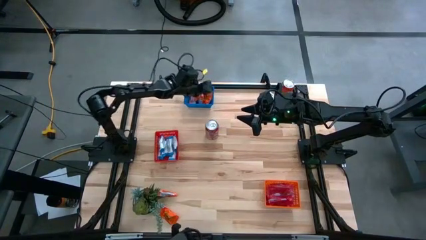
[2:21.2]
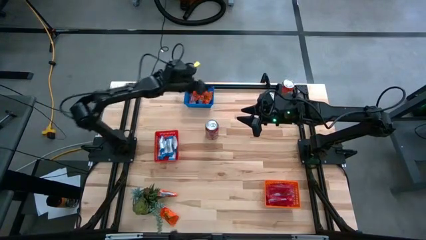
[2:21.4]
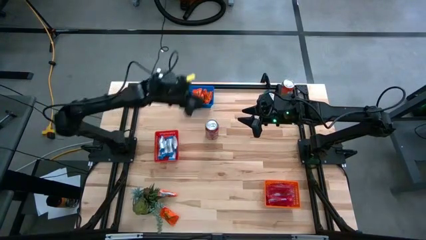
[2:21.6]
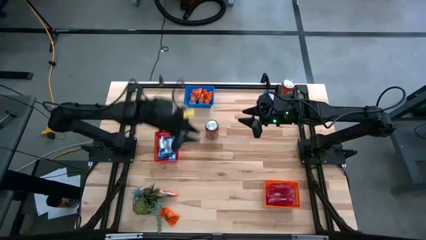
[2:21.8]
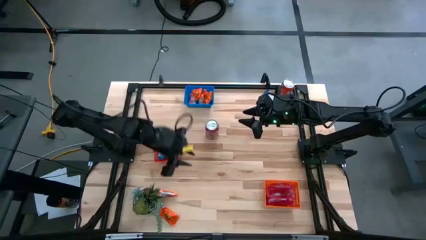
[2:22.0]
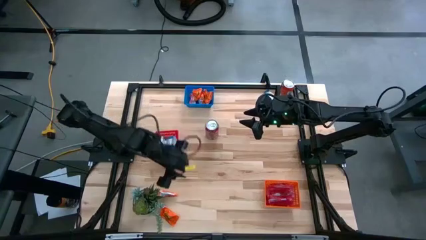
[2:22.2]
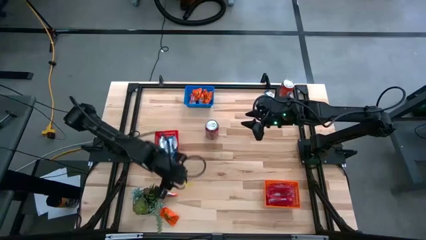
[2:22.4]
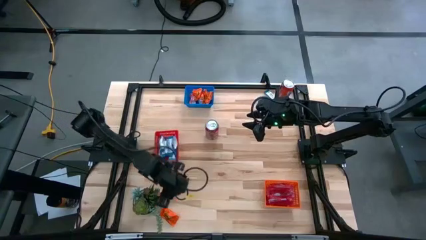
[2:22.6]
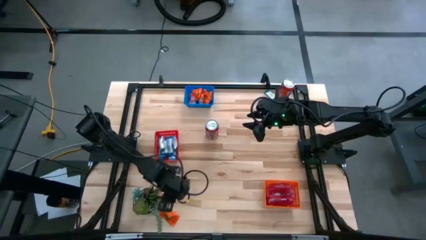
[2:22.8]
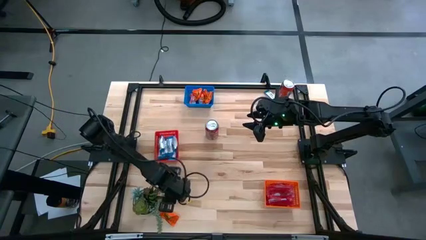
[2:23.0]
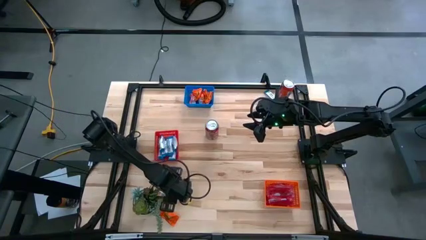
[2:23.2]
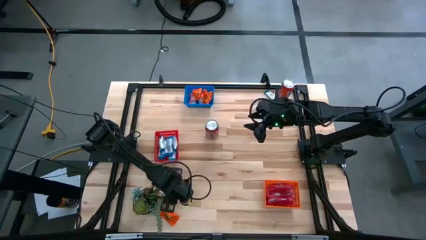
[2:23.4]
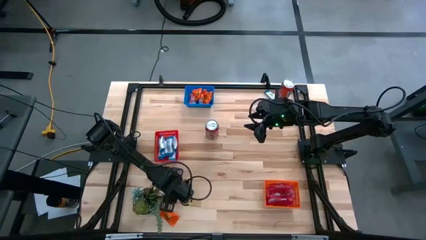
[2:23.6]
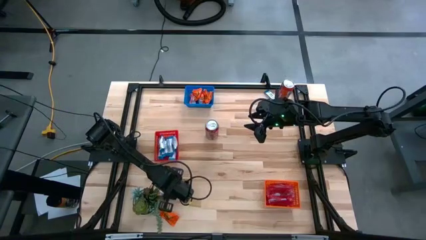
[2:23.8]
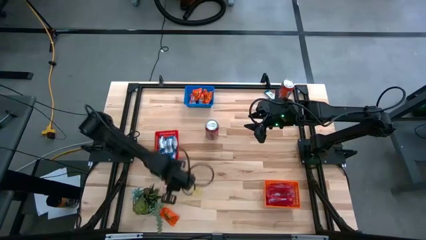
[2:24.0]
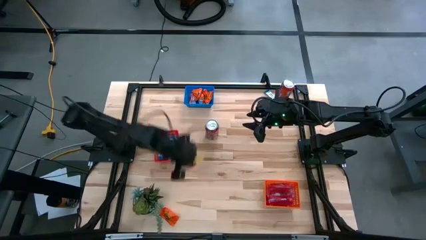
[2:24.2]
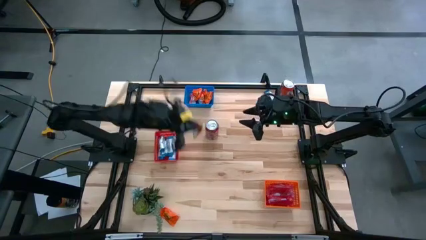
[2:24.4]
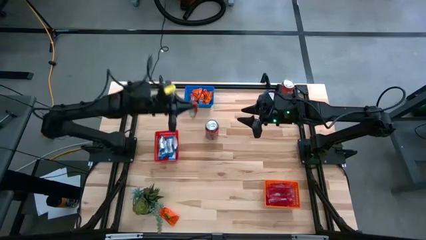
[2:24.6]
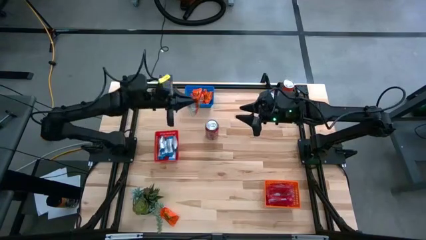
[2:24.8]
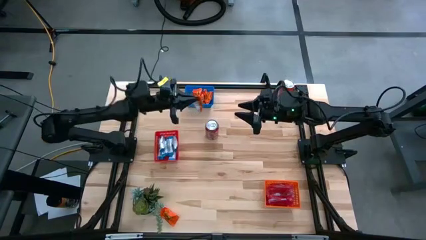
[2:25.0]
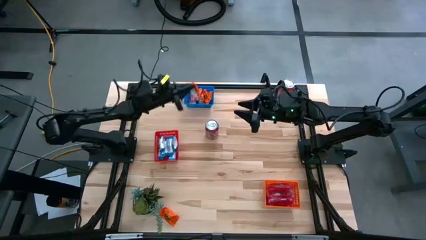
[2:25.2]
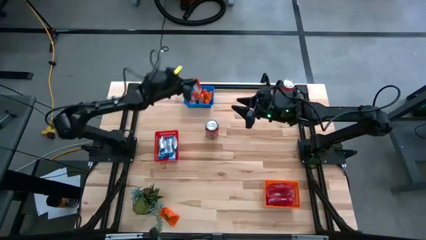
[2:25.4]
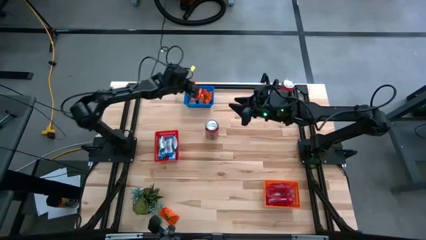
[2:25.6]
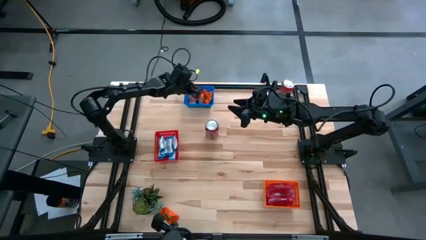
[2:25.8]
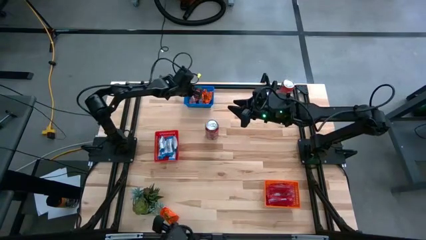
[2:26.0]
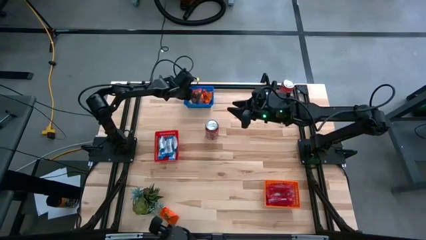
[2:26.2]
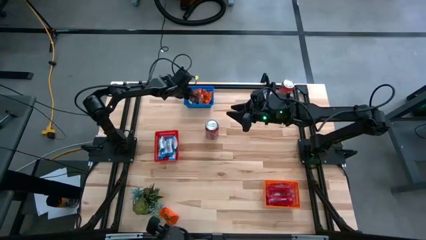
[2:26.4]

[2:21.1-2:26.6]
Task: Sort candy
Put the orange chocolate into the blue bin

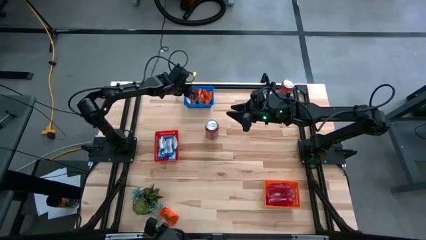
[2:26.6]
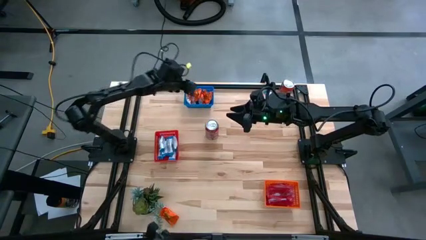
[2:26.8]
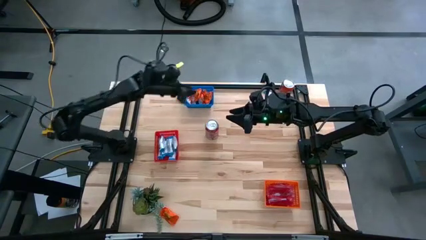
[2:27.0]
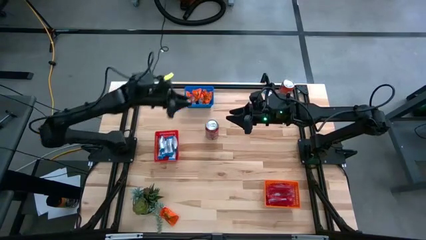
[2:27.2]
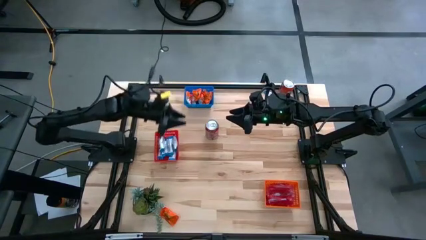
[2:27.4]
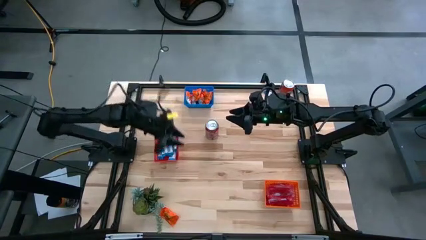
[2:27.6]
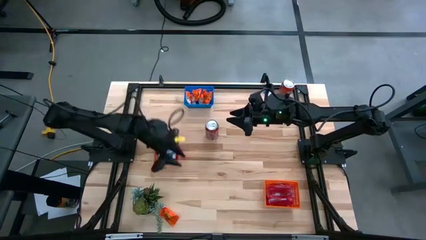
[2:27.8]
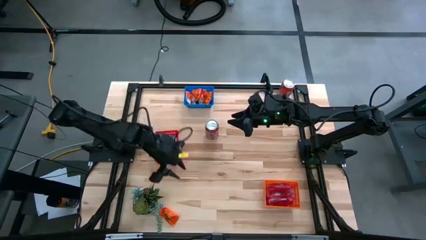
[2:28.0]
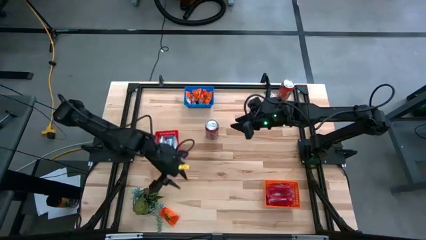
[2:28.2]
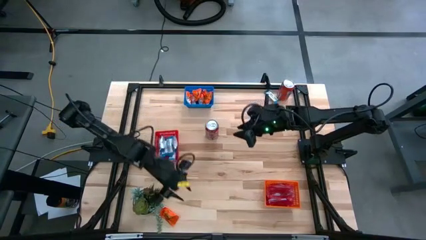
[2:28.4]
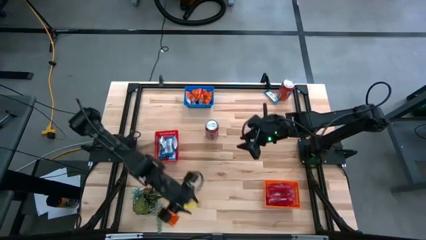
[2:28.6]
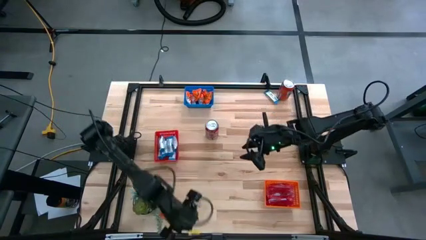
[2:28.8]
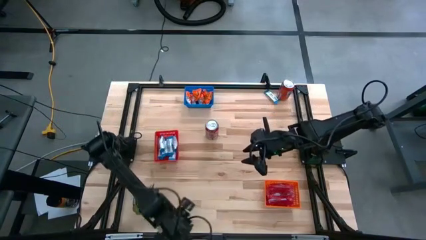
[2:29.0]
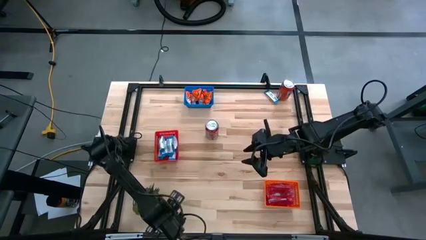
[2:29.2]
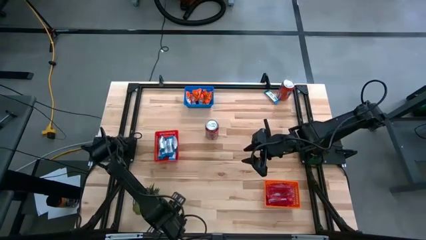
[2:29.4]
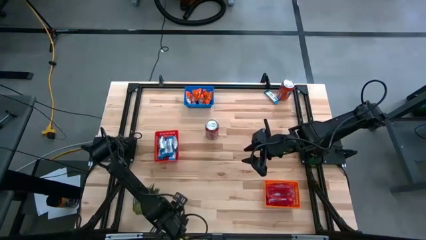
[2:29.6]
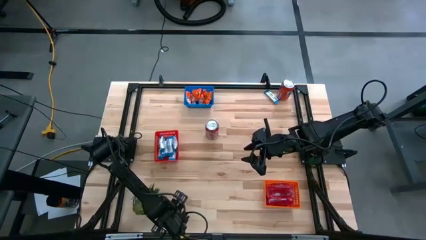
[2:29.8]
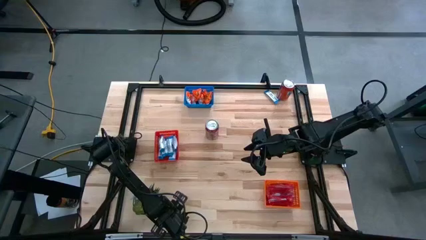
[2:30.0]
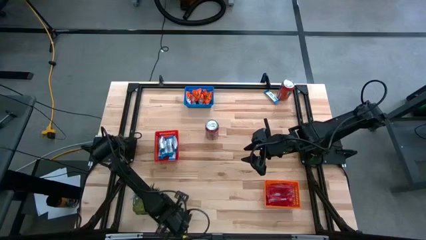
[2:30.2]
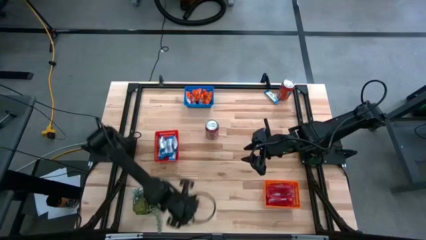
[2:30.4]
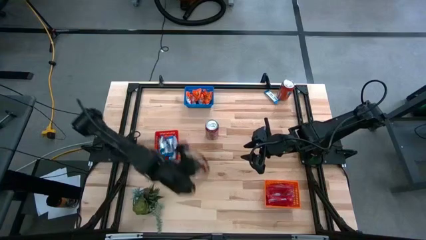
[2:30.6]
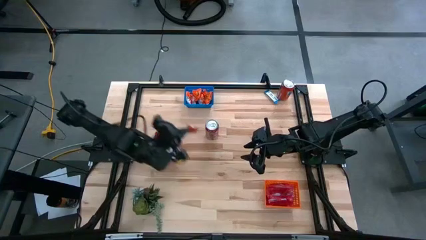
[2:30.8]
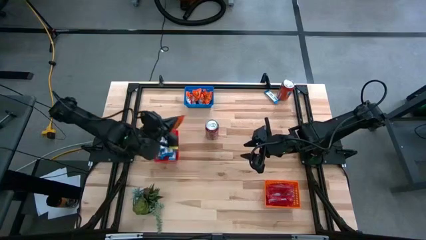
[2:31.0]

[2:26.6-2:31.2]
Put the orange chocolate into the blue bin

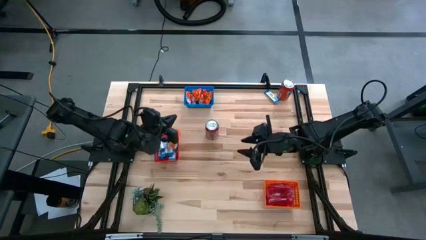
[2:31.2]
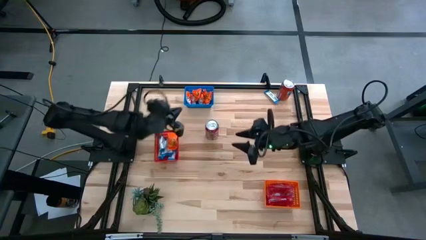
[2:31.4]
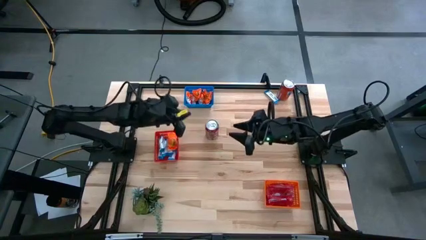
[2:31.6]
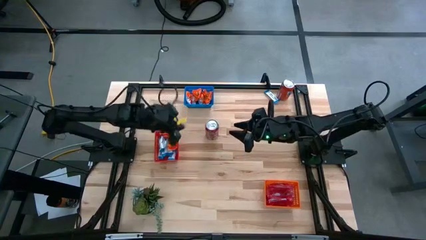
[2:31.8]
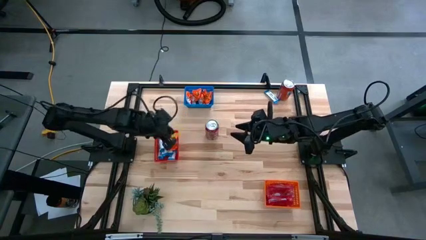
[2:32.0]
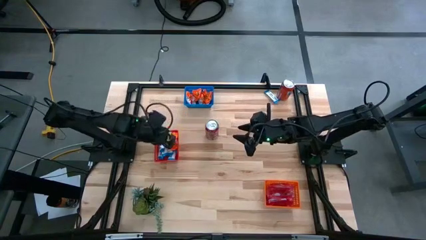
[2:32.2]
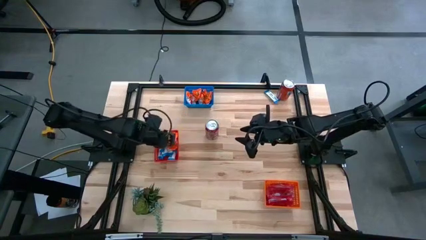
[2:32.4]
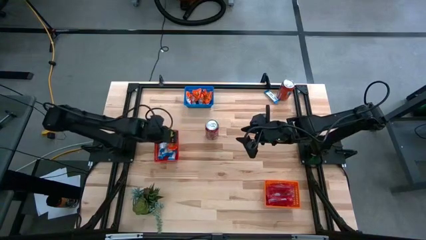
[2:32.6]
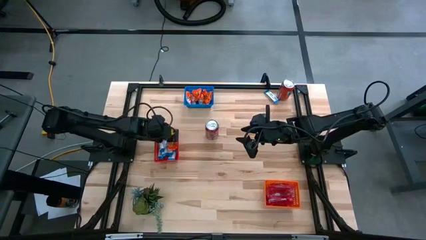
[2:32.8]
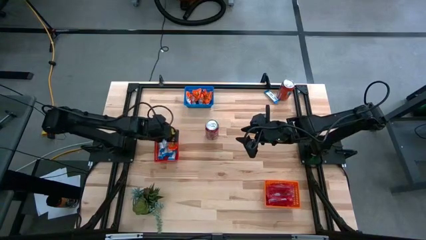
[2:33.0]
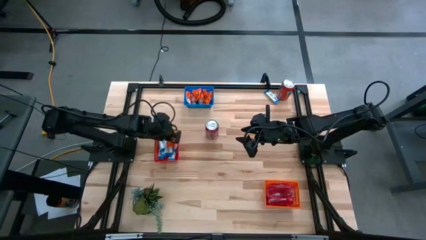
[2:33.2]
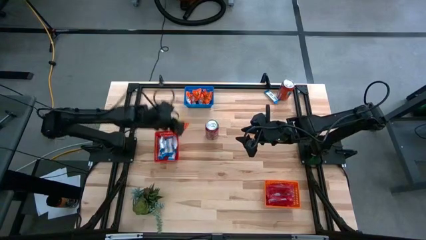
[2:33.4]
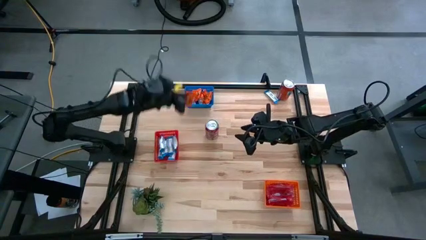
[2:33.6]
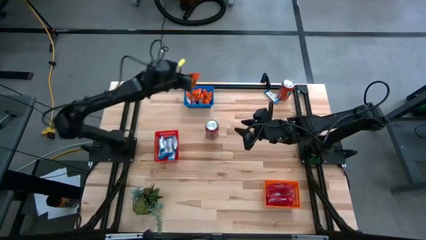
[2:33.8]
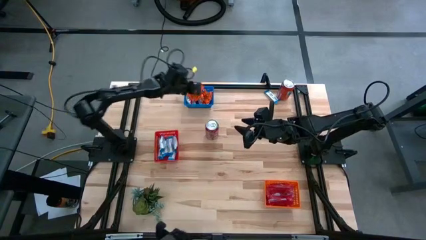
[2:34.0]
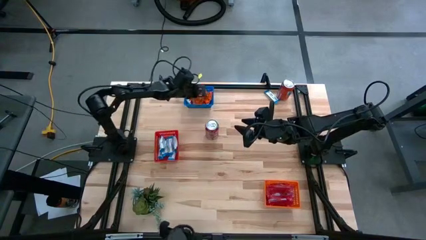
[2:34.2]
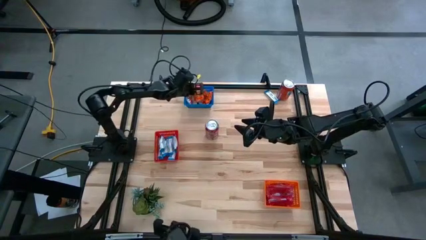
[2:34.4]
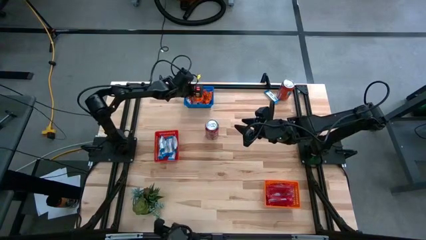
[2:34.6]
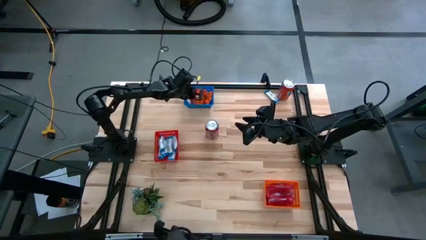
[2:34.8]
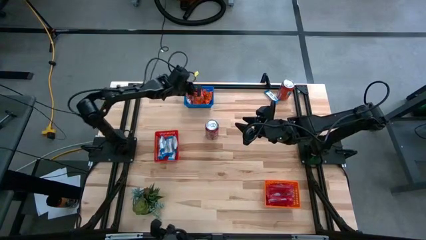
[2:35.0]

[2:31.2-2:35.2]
Put the orange chocolate into the blue bin

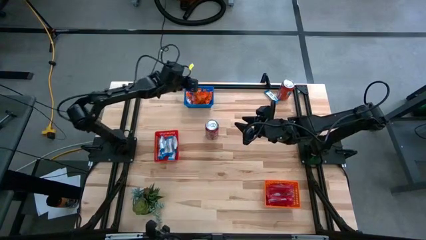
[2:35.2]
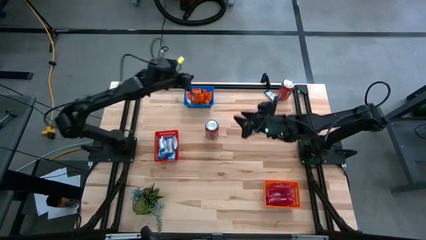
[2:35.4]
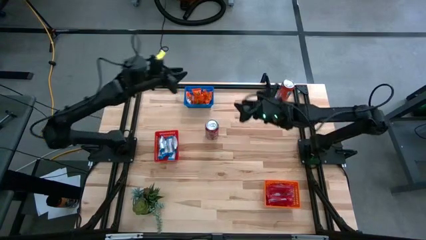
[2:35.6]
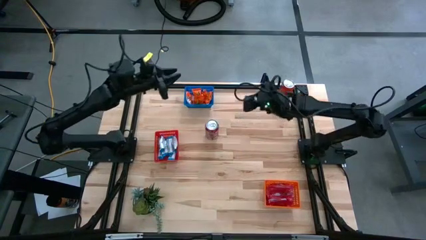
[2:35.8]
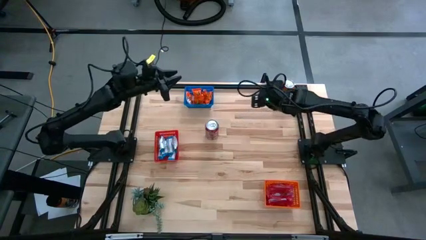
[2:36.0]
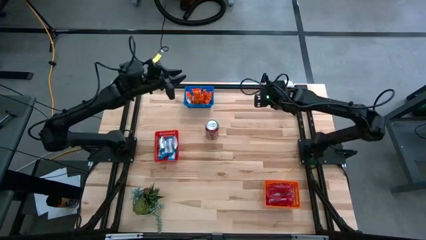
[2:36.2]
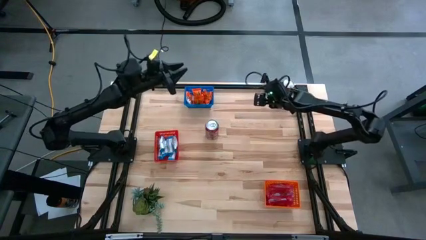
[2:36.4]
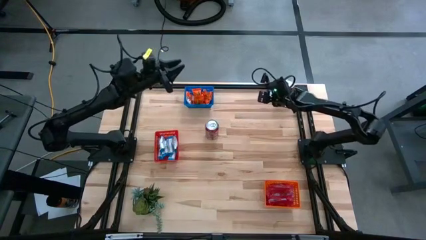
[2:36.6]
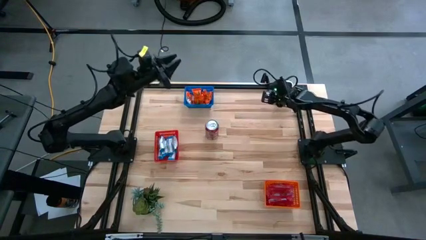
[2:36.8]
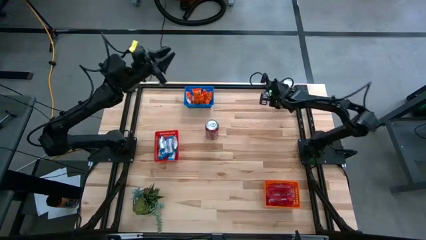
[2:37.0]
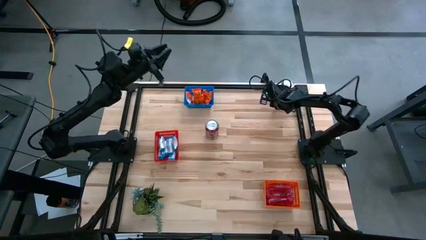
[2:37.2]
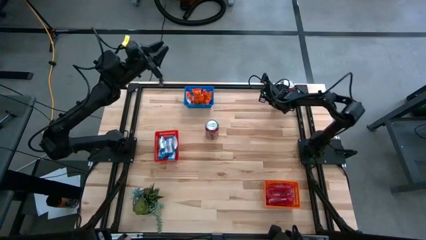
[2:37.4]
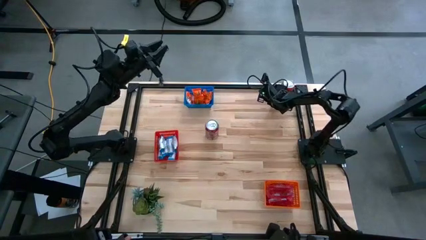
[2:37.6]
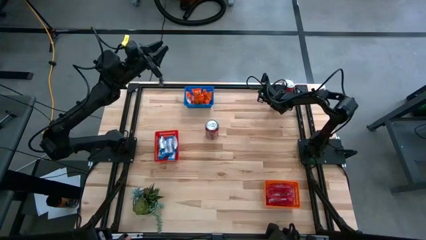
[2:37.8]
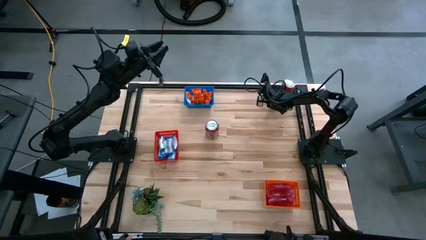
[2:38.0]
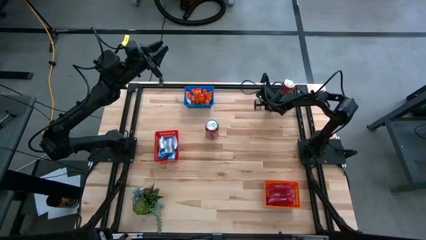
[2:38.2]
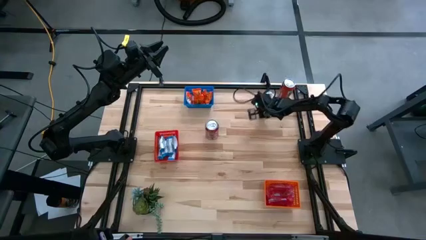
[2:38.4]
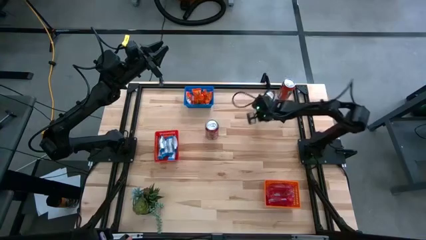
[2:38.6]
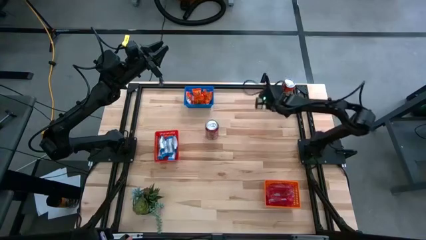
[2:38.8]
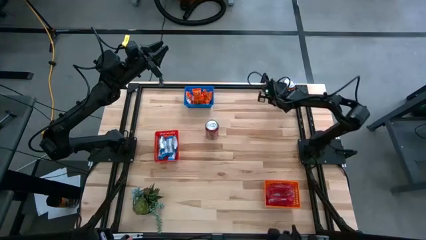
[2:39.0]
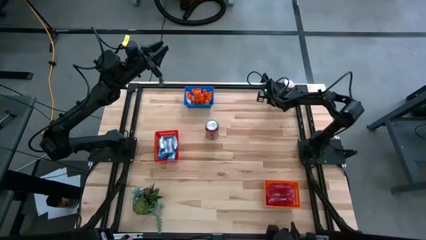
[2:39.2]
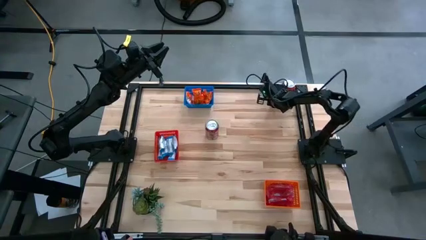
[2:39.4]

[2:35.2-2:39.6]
Put the white chocolate into the red bin
